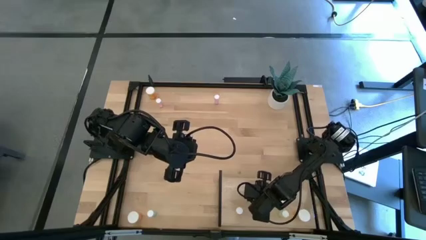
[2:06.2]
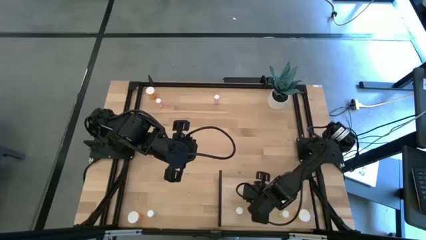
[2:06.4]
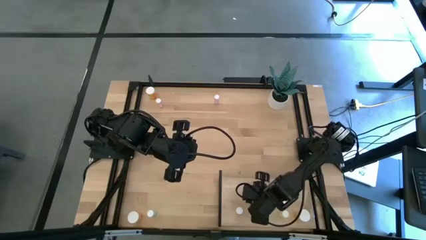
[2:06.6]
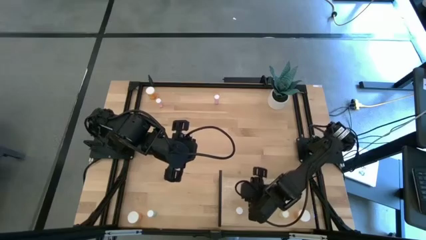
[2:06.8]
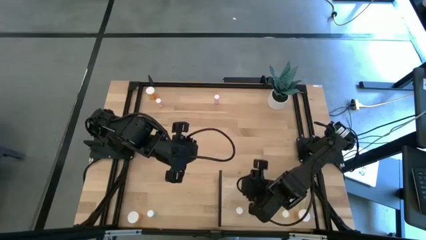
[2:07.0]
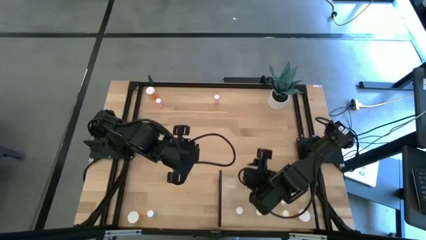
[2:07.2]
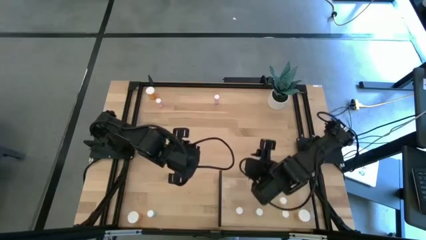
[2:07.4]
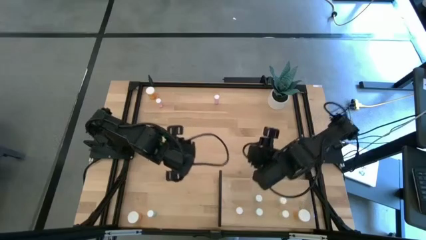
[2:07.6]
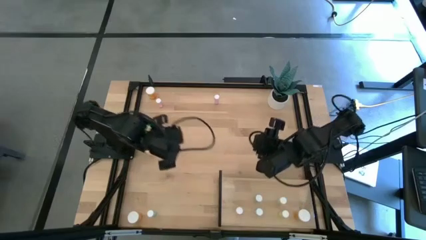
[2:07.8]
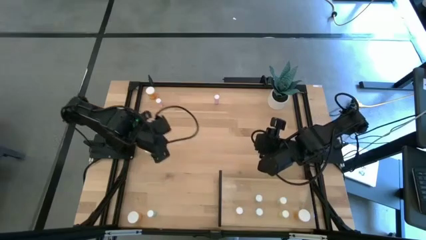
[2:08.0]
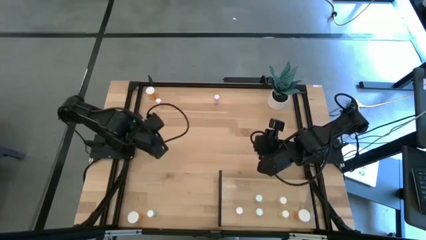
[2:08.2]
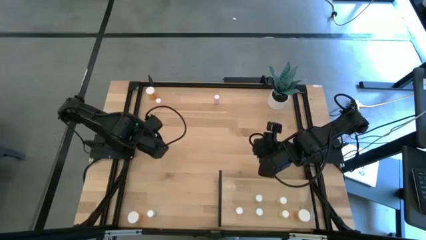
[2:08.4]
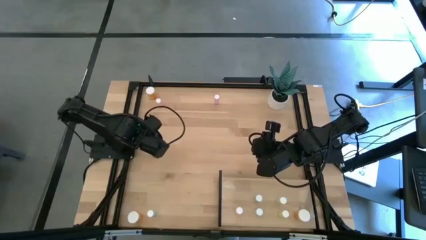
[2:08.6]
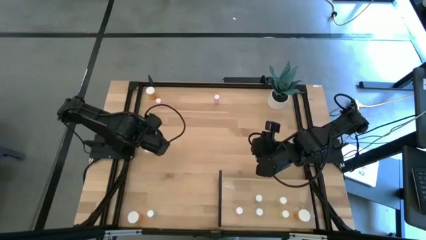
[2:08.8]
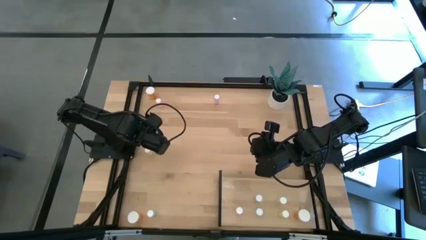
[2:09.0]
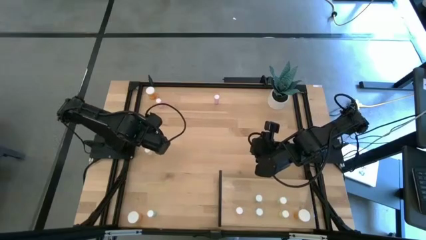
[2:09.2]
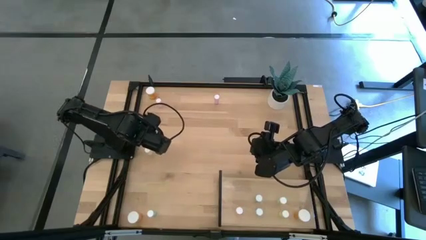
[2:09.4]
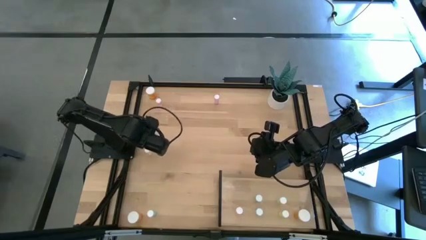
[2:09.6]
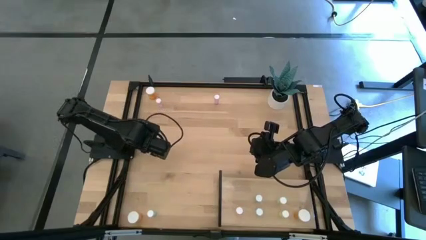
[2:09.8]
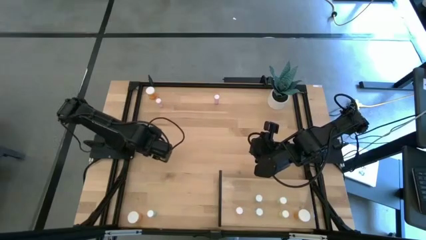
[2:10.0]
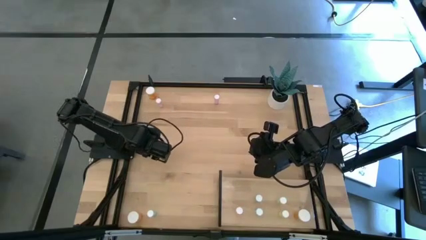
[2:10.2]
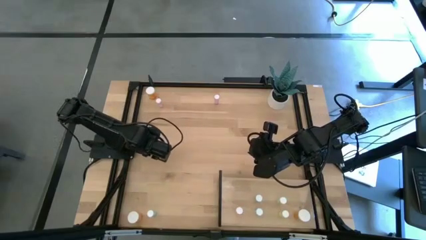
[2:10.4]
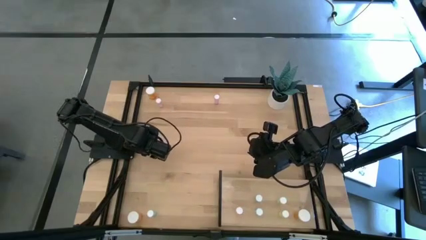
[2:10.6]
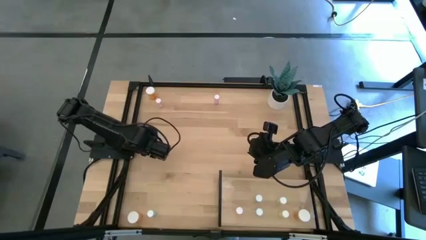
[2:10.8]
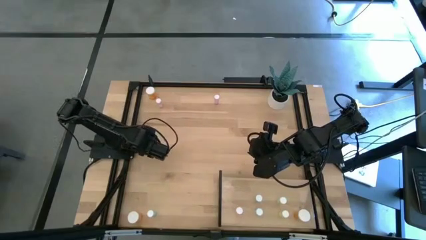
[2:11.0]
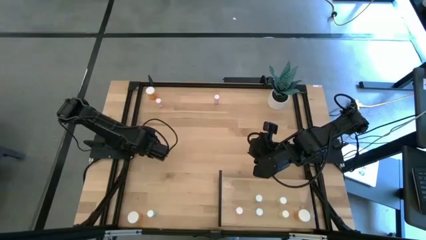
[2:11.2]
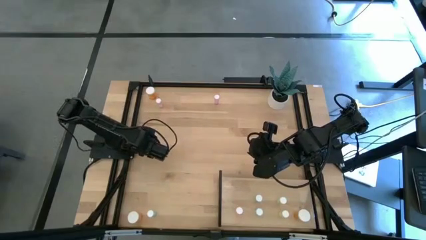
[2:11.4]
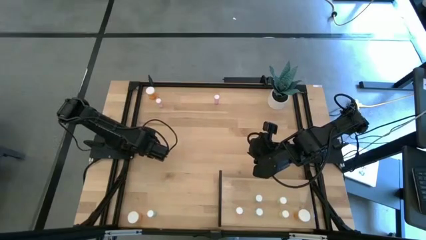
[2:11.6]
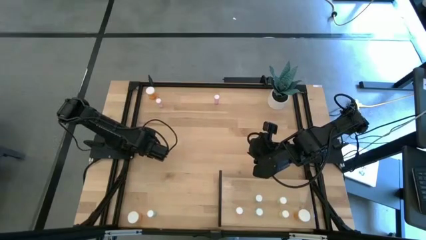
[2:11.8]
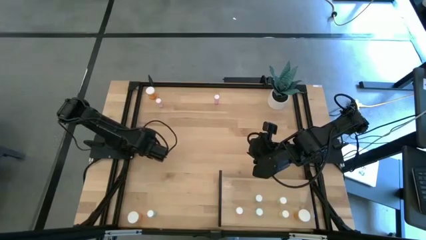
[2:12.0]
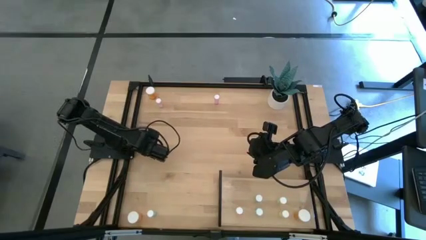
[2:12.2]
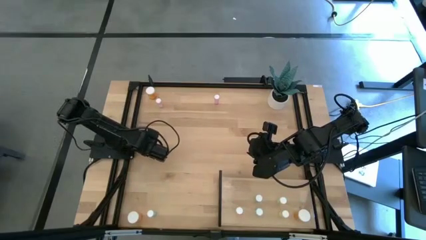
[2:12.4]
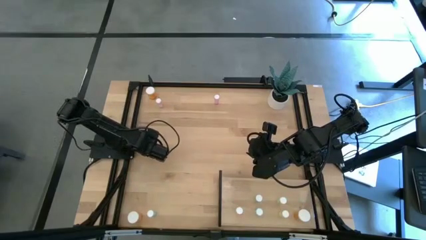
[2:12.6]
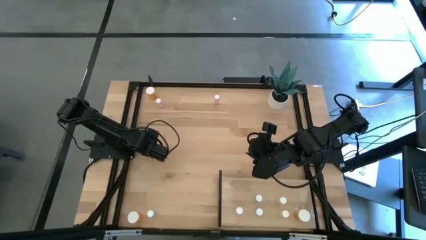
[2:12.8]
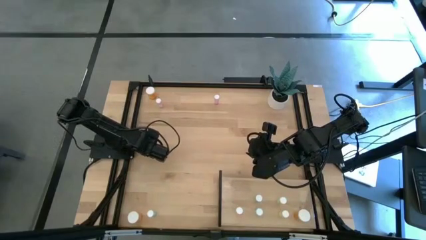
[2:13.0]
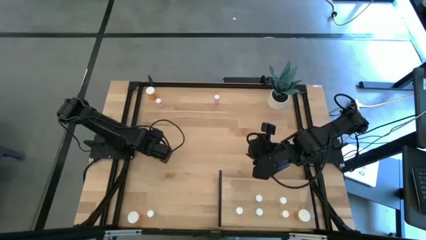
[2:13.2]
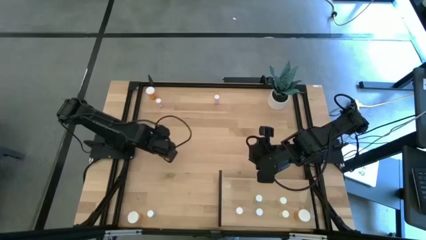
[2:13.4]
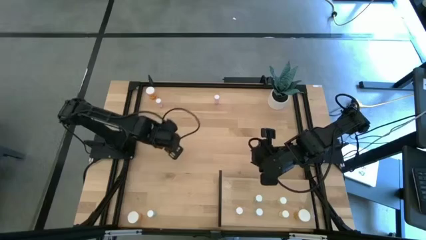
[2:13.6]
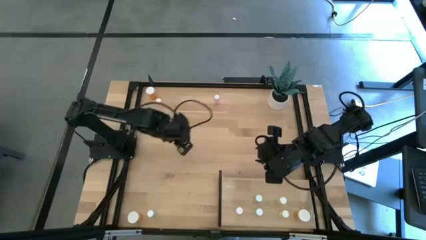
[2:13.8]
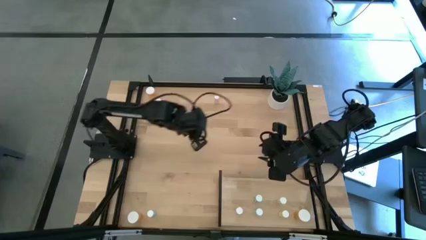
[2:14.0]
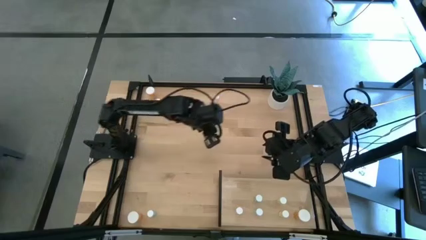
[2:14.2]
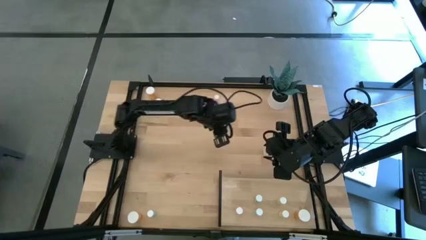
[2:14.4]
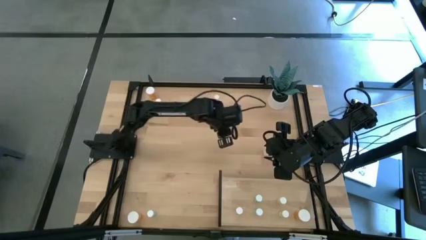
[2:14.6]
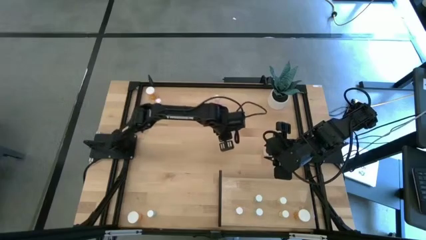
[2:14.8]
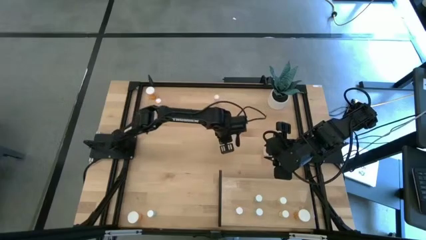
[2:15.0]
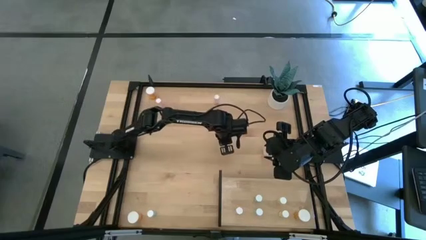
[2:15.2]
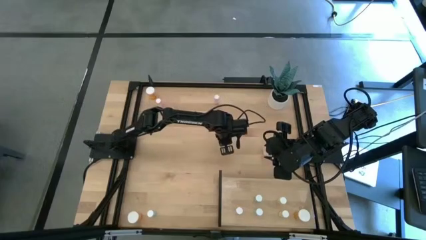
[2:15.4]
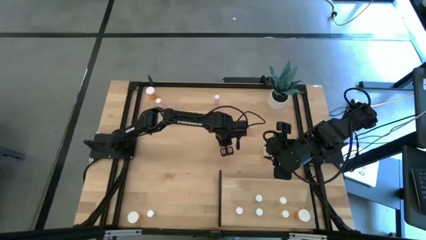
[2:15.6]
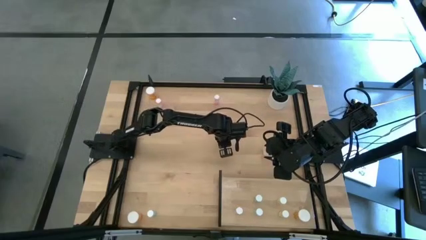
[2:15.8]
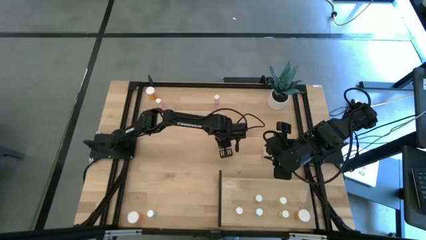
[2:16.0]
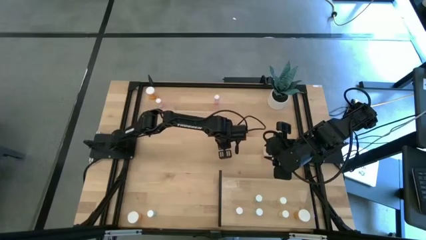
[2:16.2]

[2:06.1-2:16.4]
Task: Pick and place medicine bottles onto shelf by color
Put the yellow pill bottle on the shelf aligned with the other yellow pill bottle

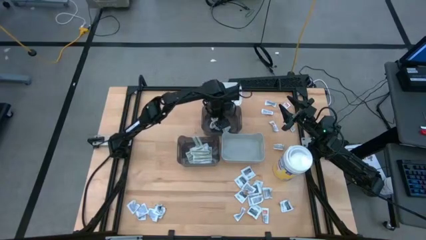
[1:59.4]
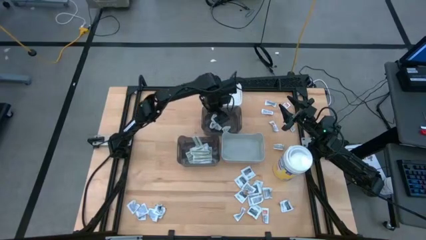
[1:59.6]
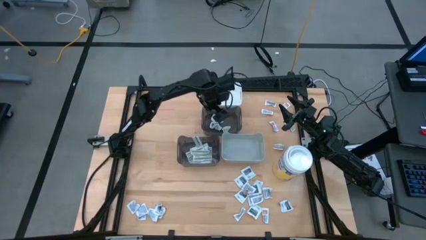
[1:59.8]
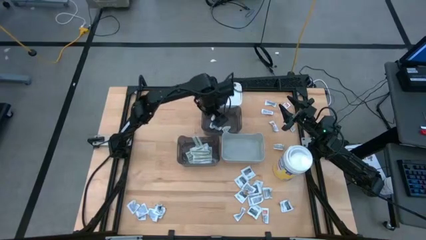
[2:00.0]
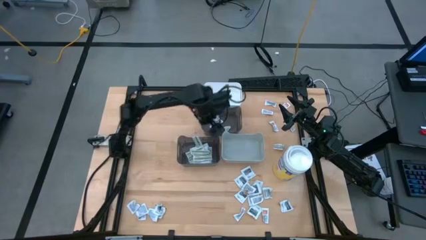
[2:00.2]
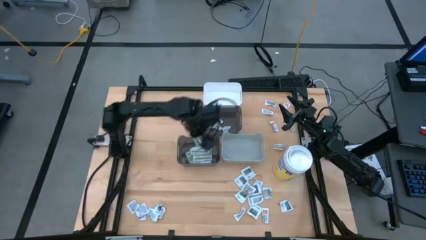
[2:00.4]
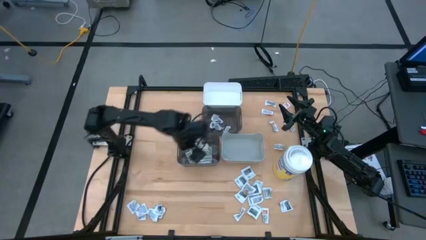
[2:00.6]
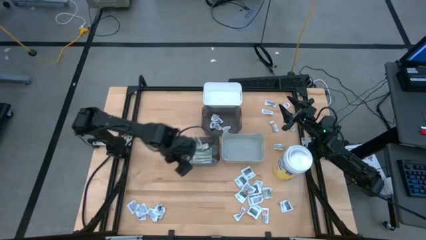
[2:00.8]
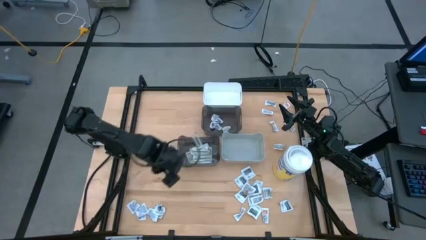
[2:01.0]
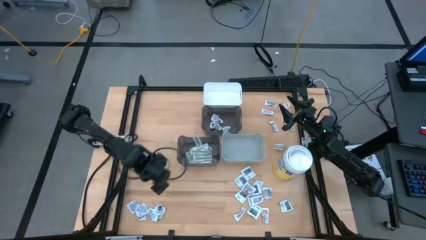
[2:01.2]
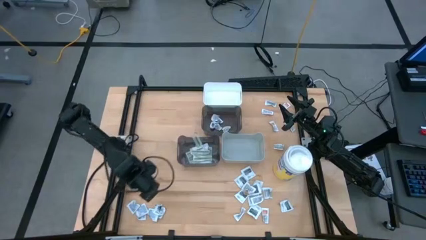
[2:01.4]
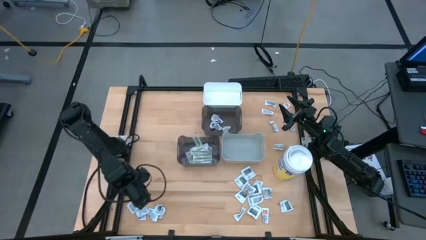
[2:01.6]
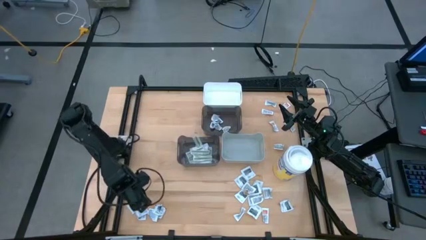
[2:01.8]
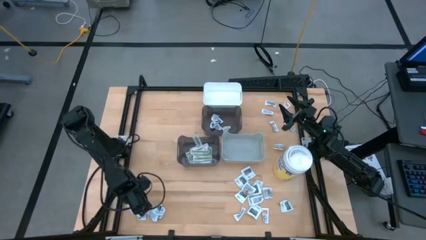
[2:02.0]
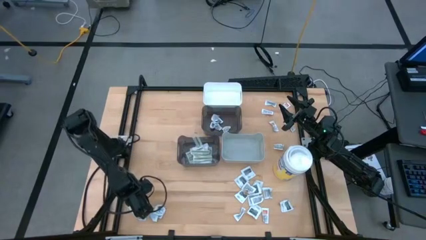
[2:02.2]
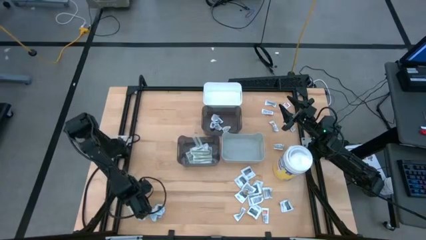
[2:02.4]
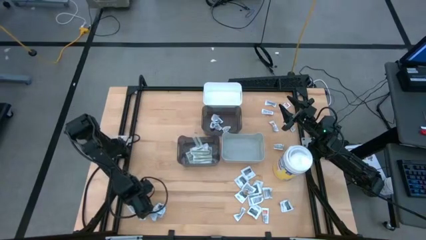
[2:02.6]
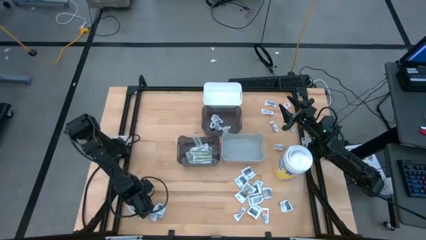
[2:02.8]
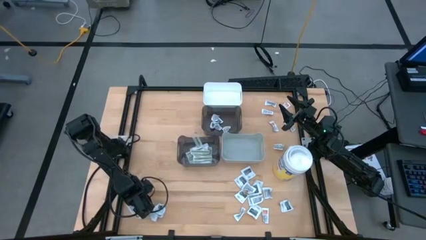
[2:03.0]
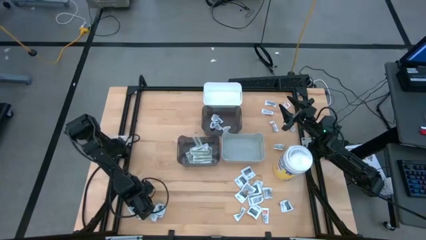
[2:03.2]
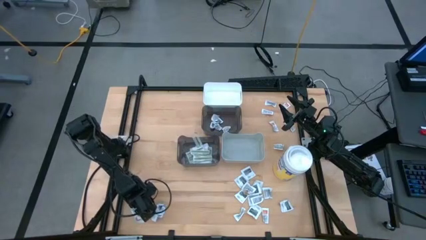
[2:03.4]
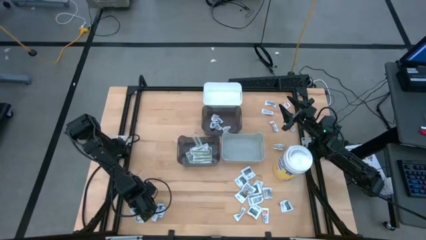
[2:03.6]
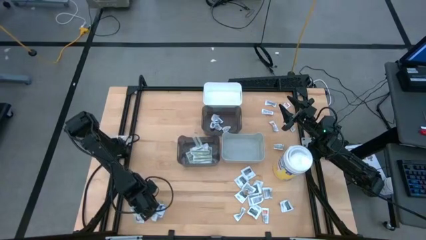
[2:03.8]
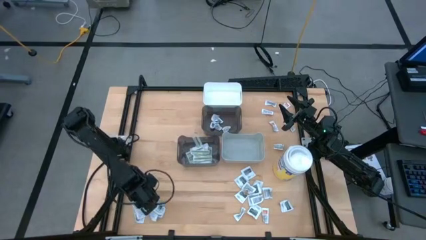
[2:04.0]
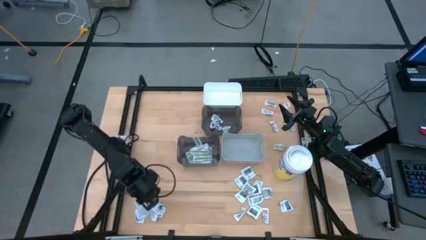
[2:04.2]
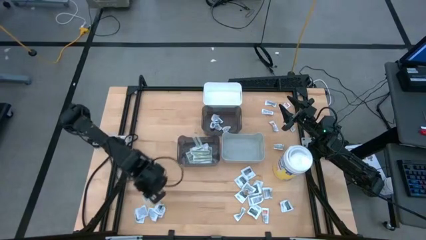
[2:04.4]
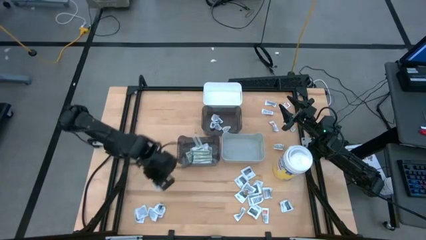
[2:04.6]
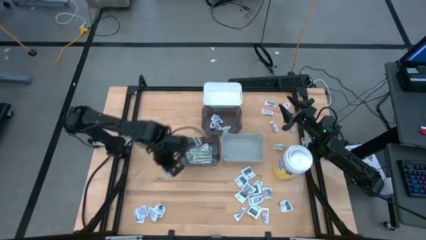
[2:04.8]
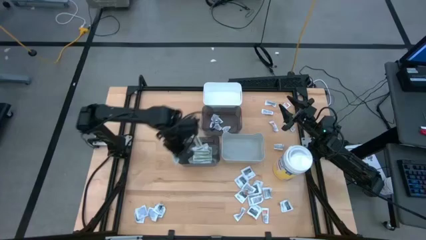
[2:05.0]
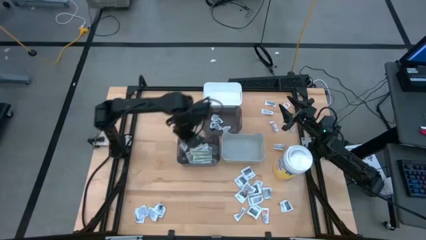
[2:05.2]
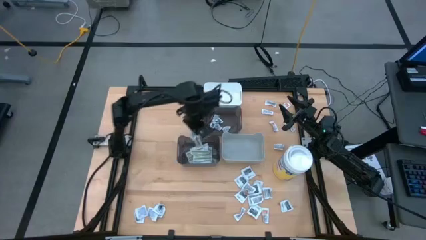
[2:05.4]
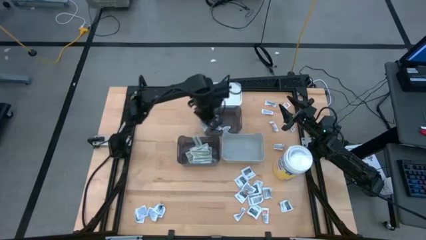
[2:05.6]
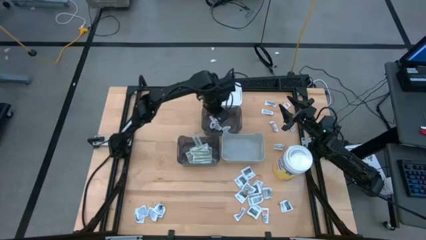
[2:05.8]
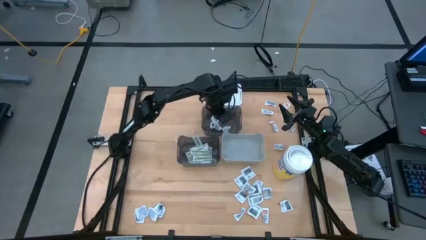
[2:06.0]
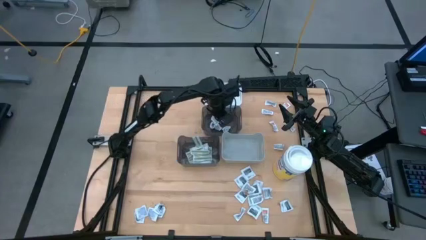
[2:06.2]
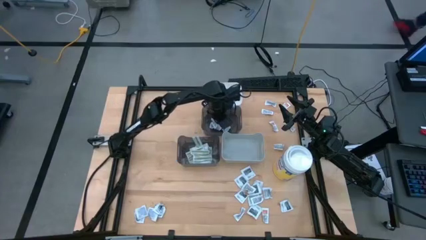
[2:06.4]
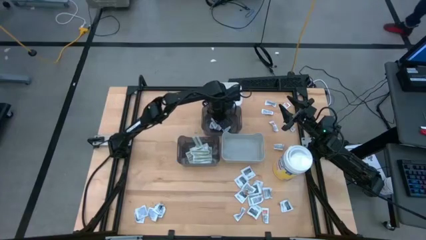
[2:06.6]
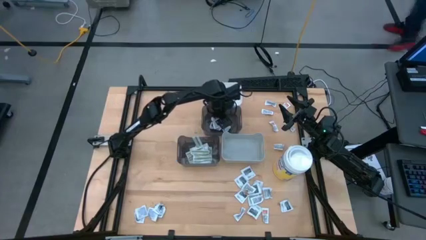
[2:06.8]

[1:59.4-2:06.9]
Task: Pick & Place First Aid Supplies
Put the white alcohol pad into the top black bin
